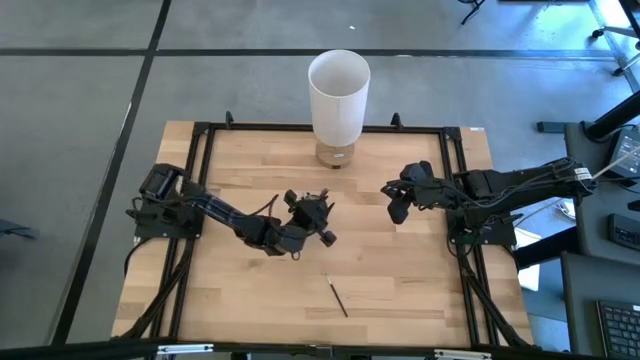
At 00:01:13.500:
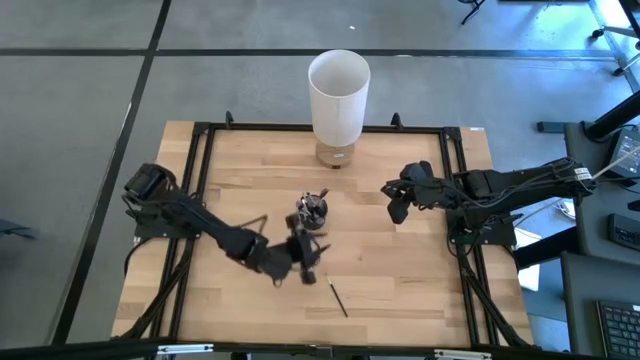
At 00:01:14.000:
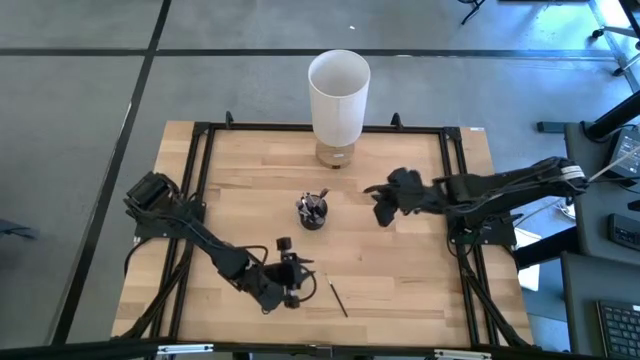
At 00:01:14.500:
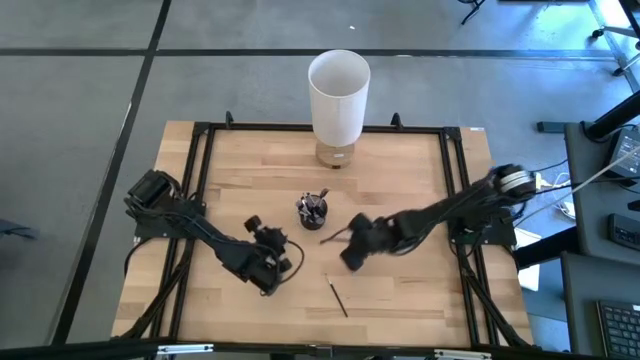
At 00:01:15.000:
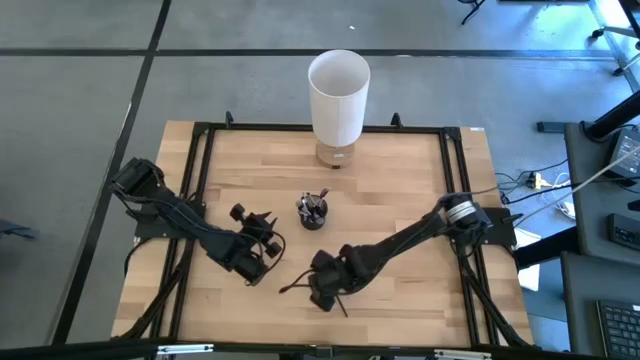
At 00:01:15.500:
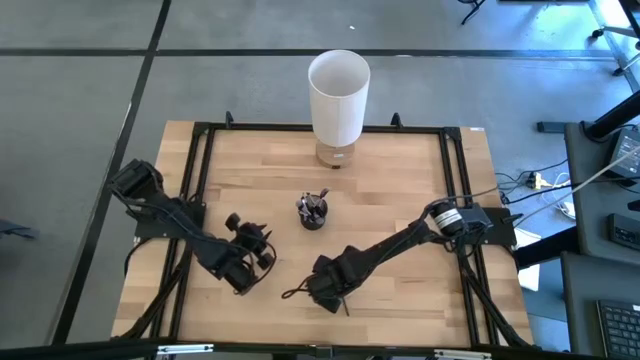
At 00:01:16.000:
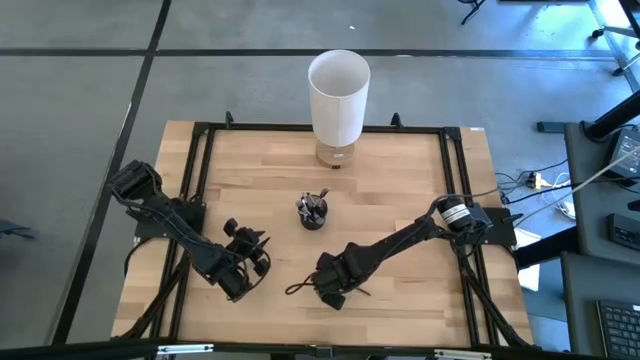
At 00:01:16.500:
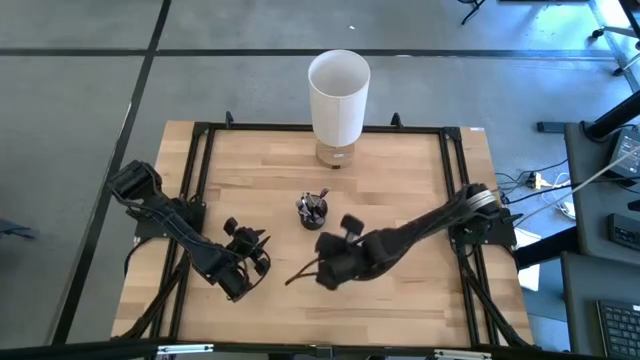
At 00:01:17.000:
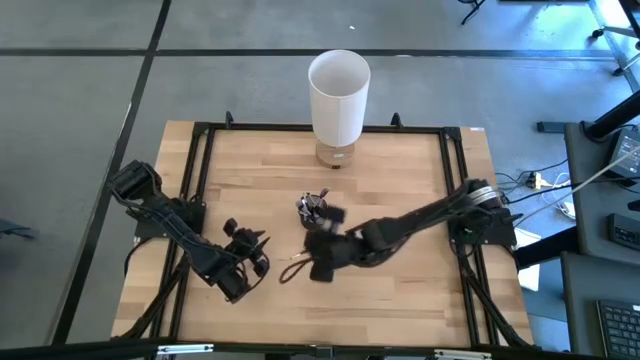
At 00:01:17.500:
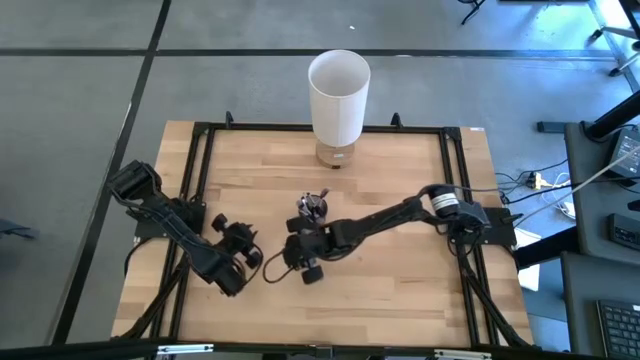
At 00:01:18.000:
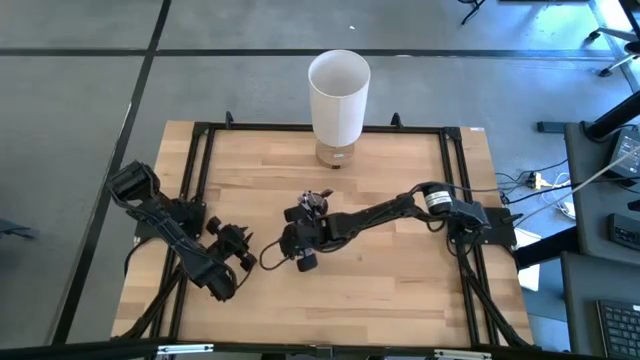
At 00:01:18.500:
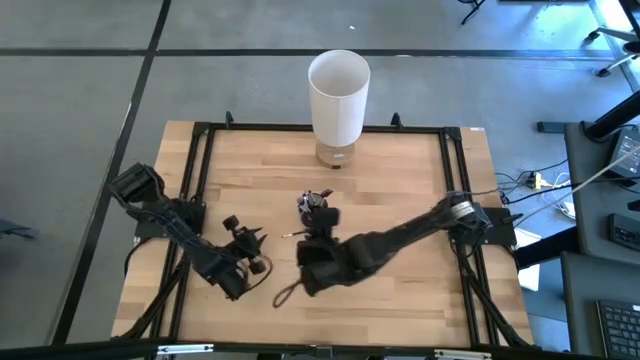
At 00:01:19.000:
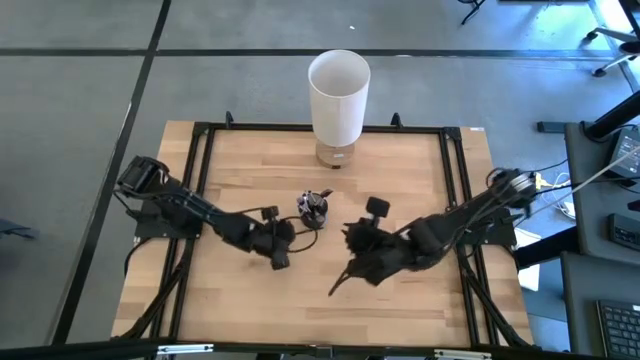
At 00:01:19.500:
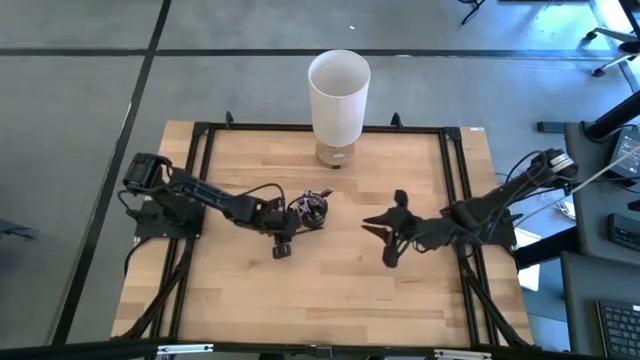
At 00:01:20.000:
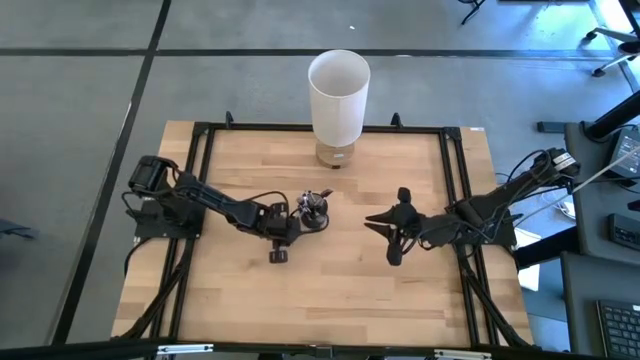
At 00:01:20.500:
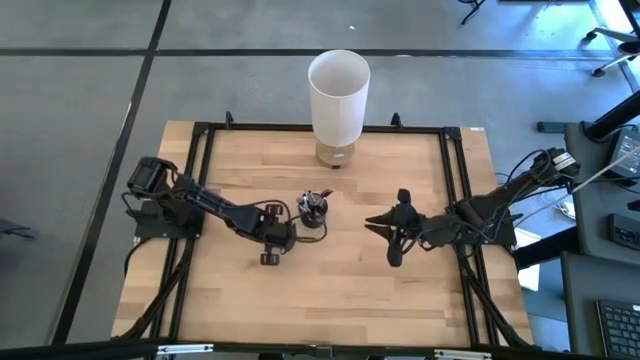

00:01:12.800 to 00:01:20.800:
Task: Put items in baskets/containers
Put the black liner brush into the black pen holder

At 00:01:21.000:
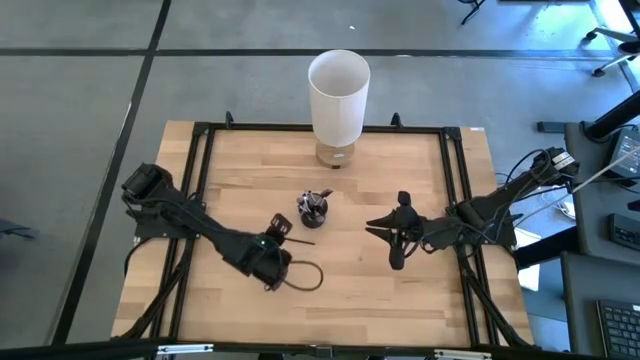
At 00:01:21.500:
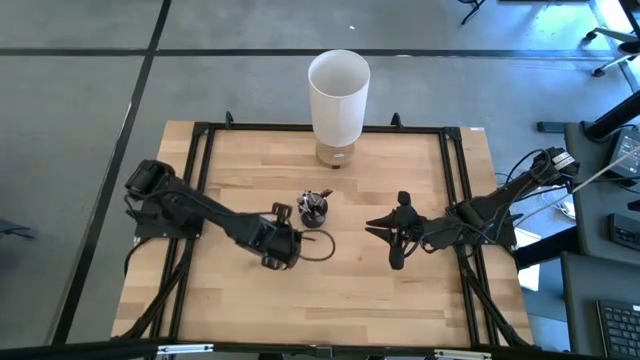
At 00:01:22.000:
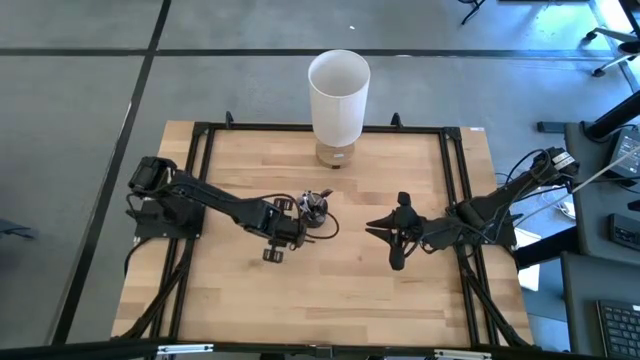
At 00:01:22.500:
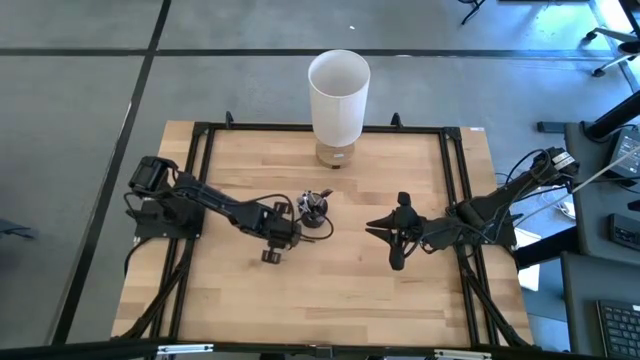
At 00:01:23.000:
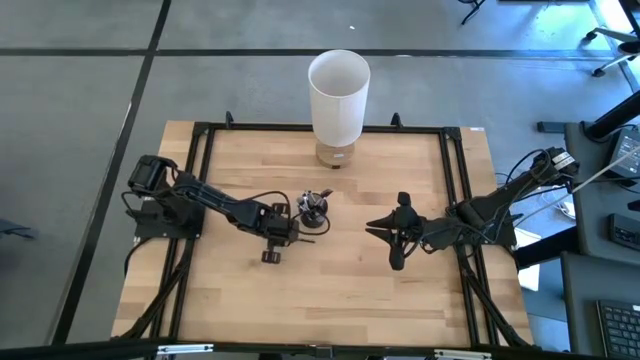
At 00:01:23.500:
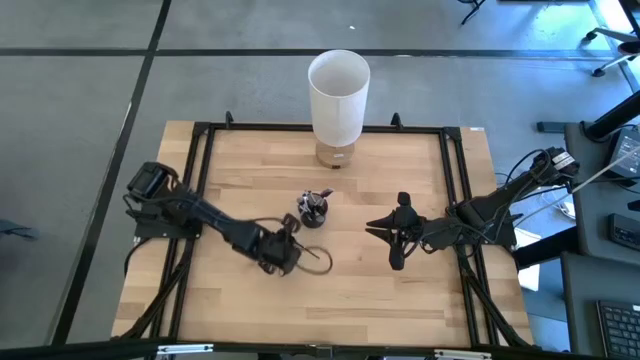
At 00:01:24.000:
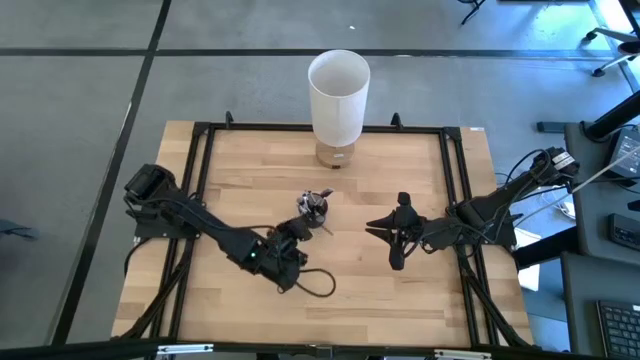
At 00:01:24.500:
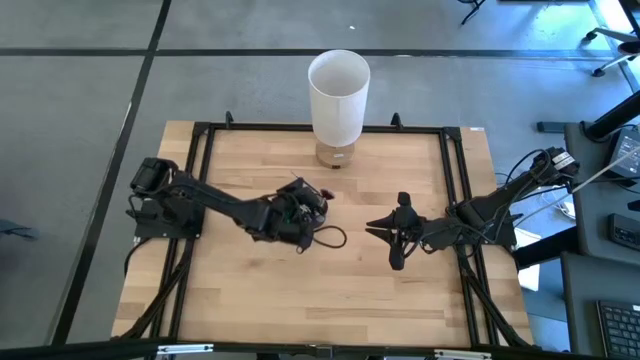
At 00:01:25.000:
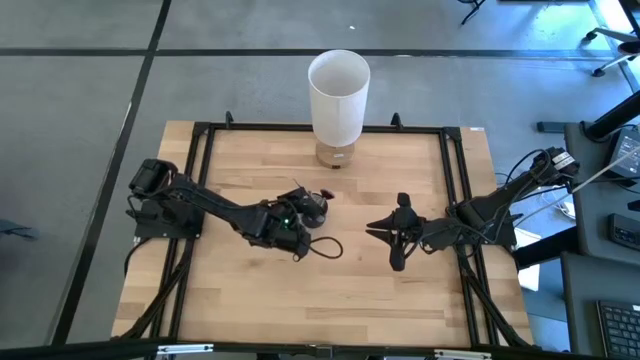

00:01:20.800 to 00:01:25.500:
Put the black liner brush into the black pen holder

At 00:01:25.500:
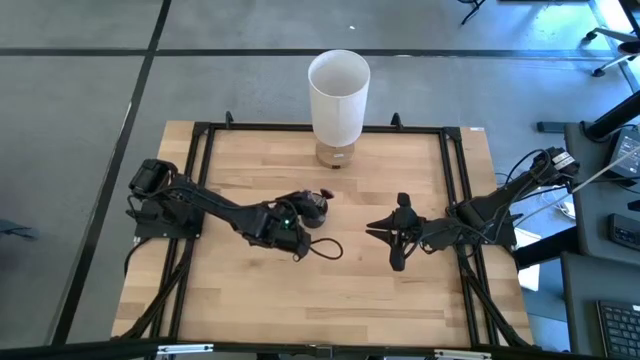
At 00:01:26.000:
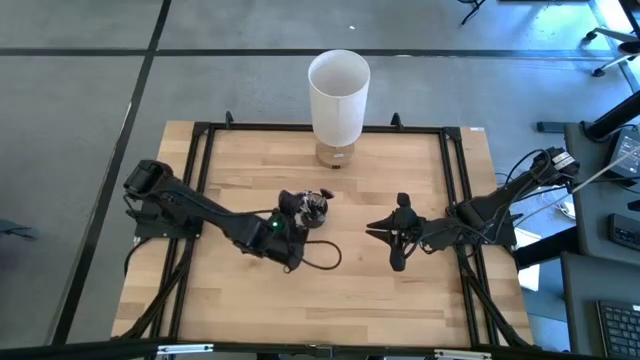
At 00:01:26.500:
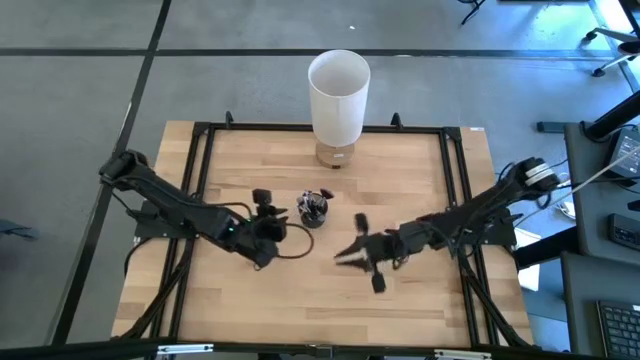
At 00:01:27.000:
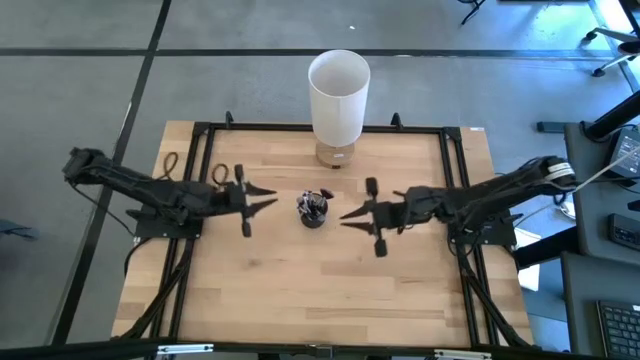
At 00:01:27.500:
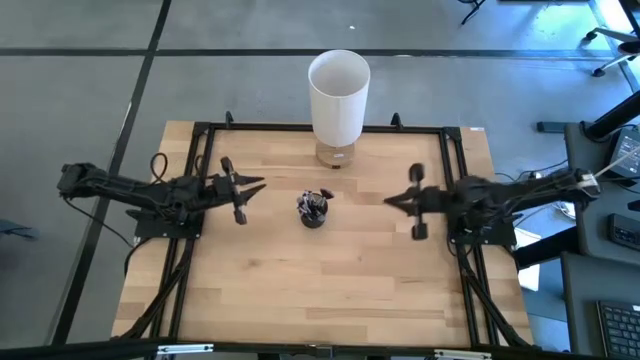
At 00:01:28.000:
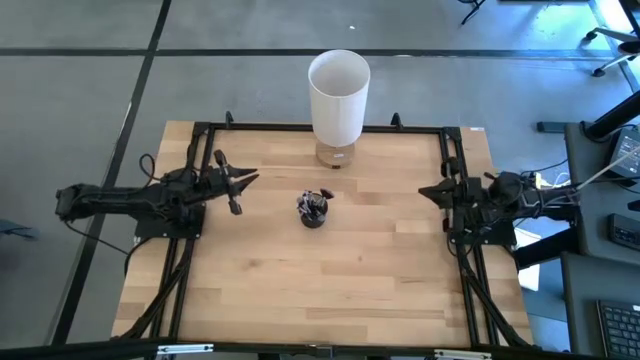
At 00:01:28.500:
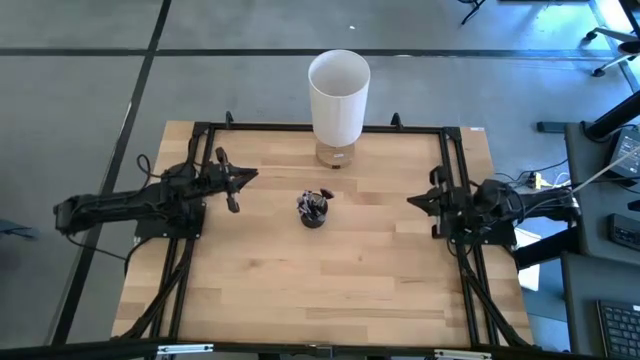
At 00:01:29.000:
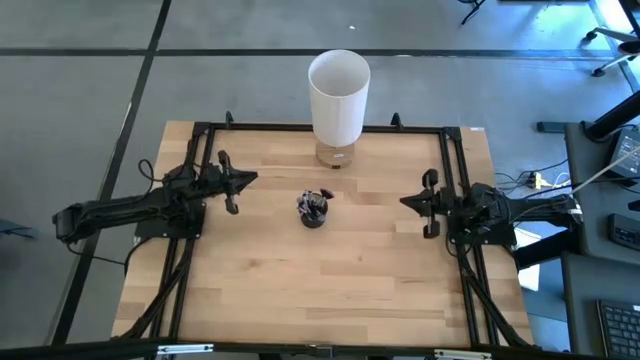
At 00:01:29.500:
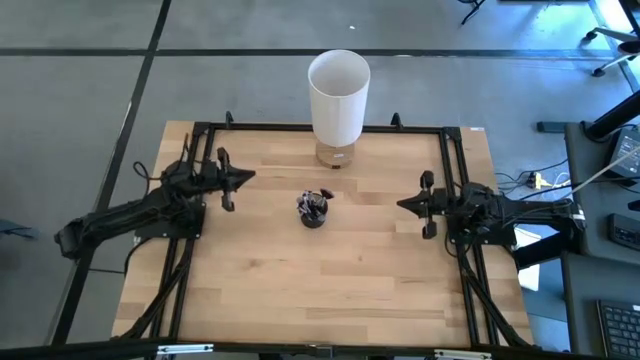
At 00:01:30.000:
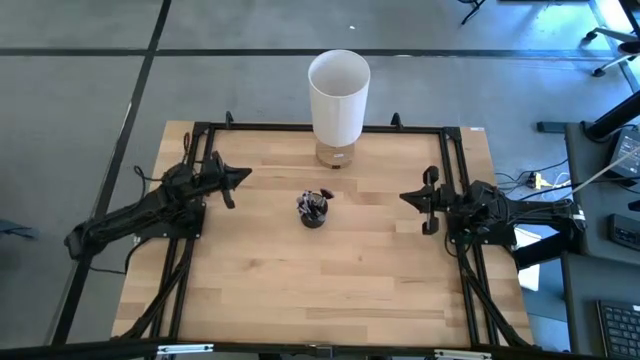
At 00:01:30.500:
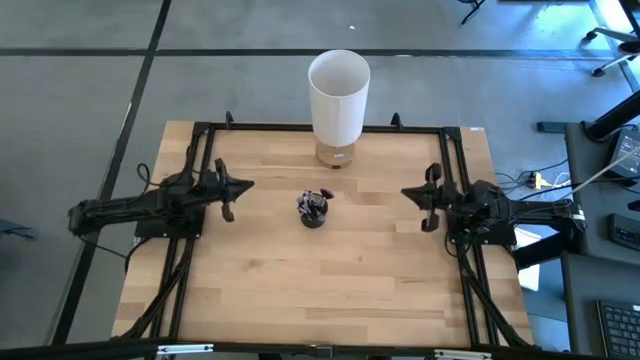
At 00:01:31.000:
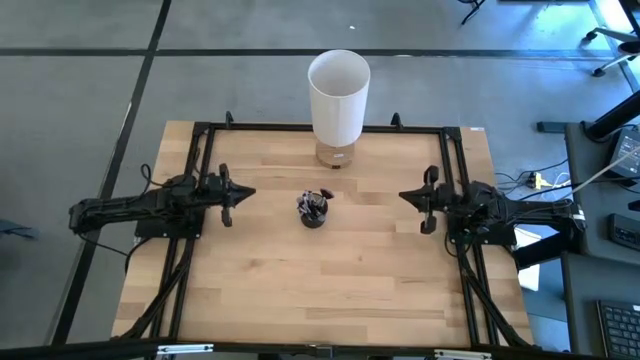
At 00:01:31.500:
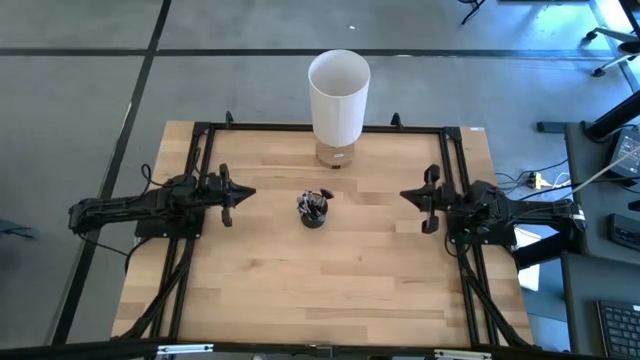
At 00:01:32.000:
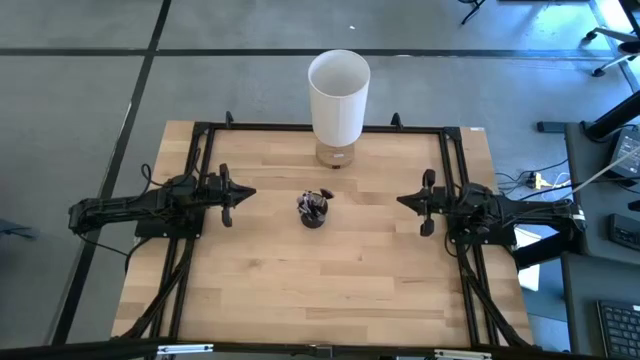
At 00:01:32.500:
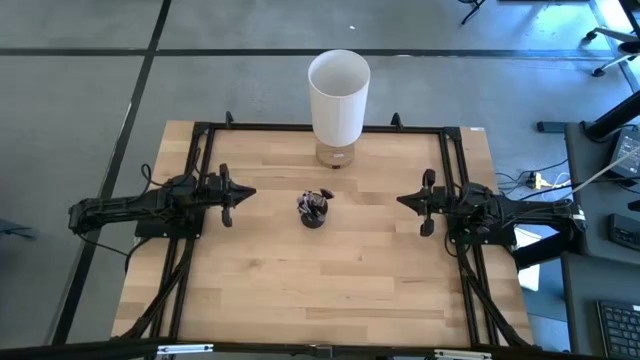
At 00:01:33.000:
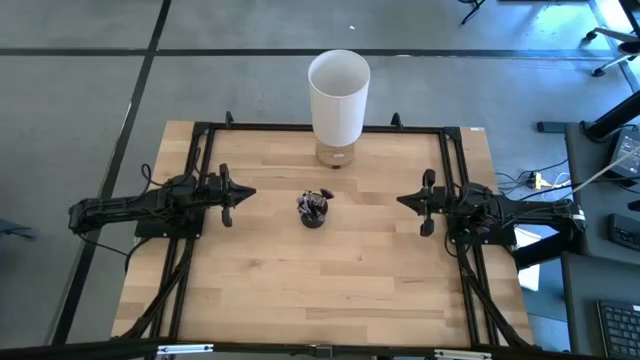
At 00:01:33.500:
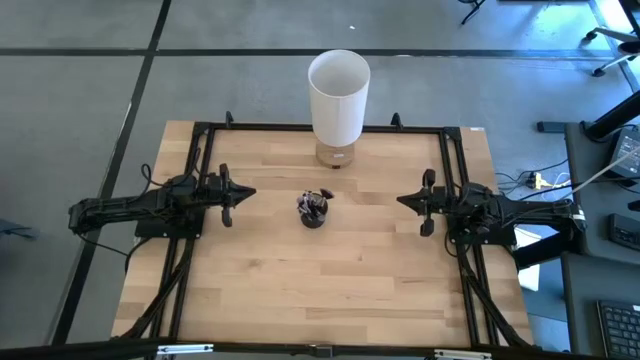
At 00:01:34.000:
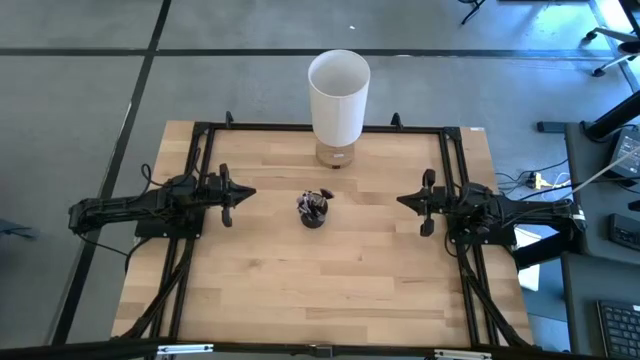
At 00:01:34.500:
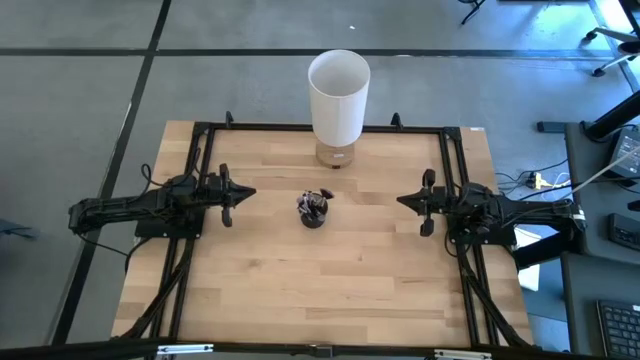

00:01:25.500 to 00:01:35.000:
Return to Home Position
